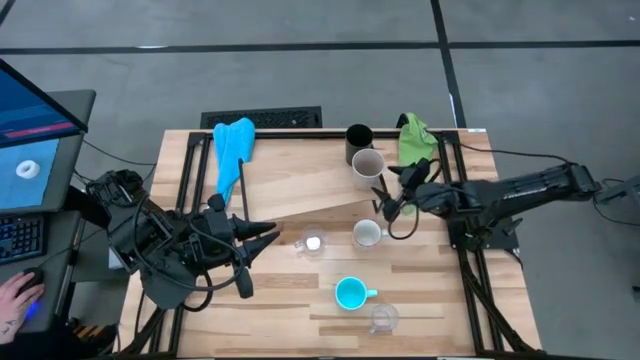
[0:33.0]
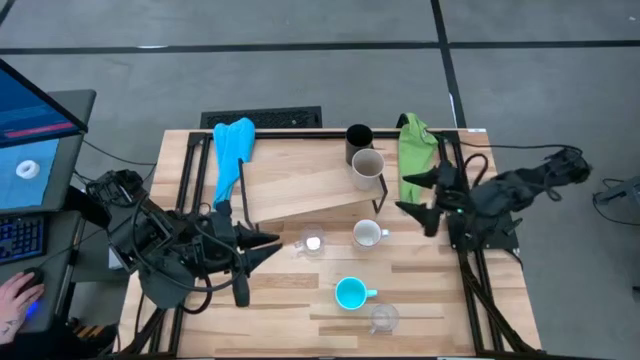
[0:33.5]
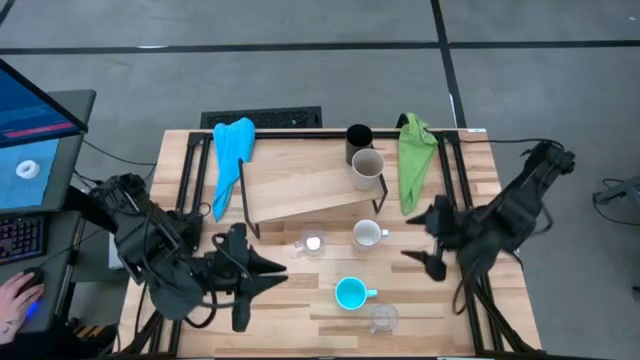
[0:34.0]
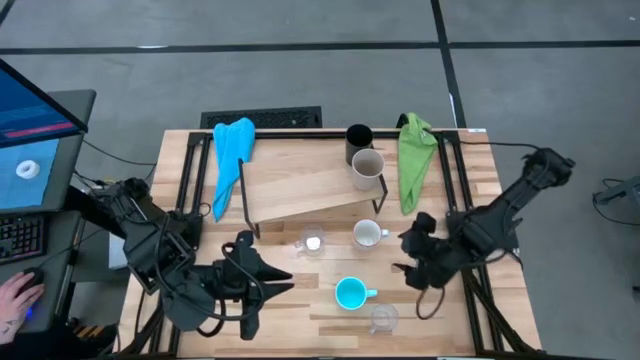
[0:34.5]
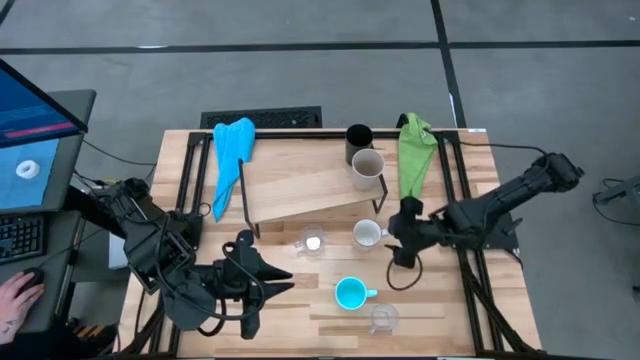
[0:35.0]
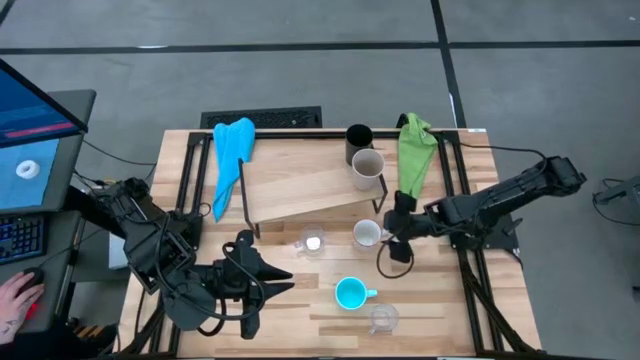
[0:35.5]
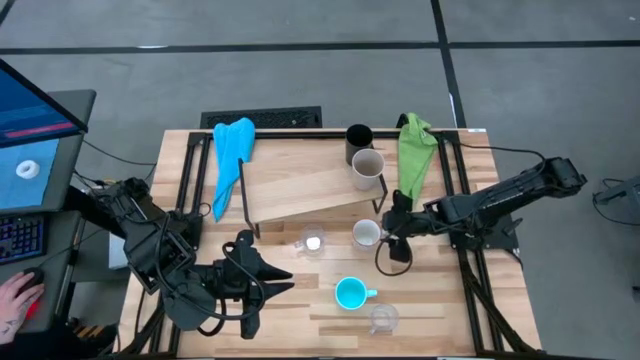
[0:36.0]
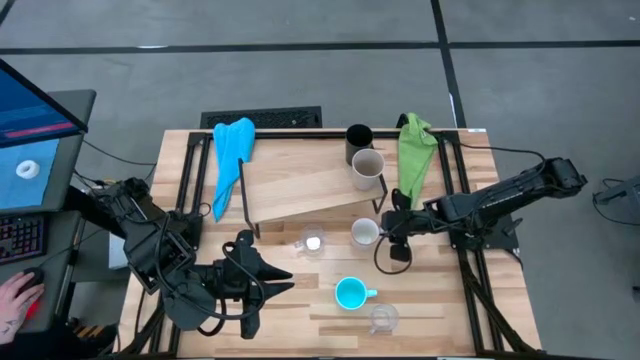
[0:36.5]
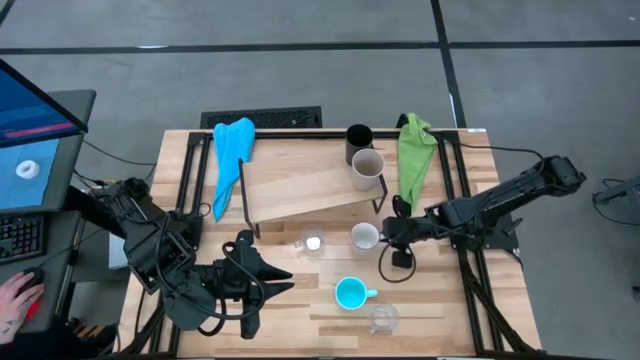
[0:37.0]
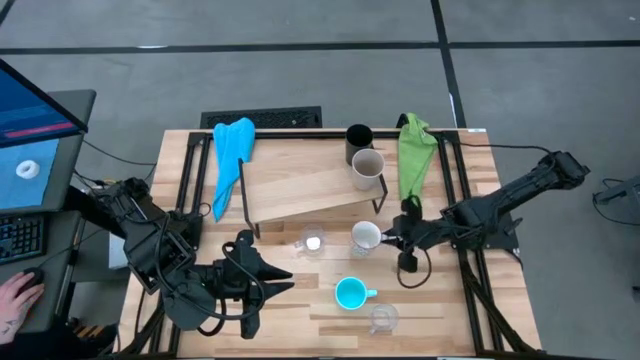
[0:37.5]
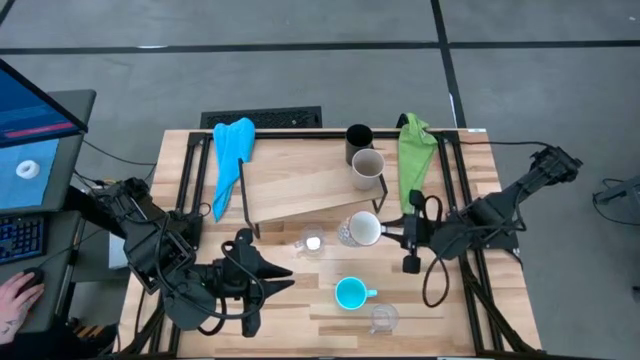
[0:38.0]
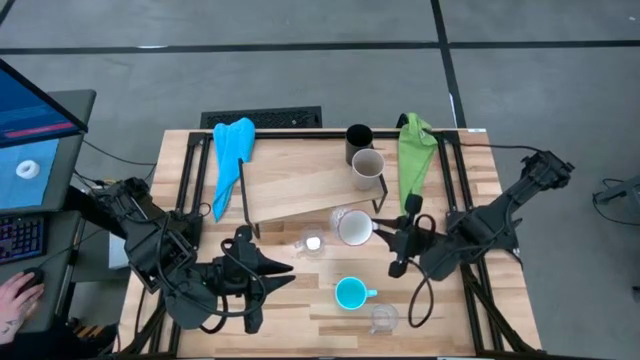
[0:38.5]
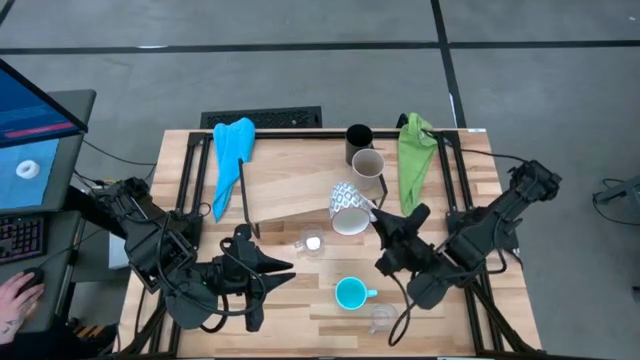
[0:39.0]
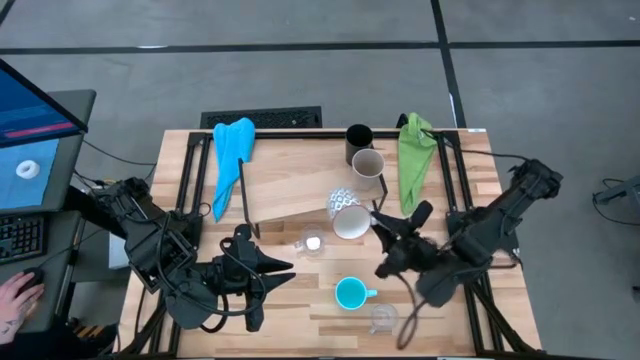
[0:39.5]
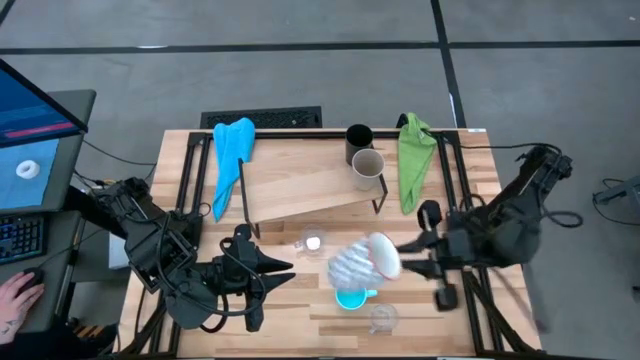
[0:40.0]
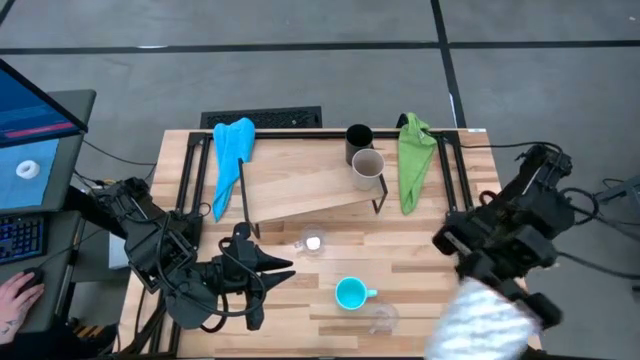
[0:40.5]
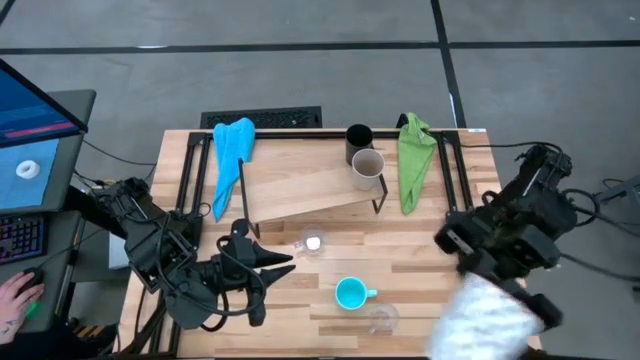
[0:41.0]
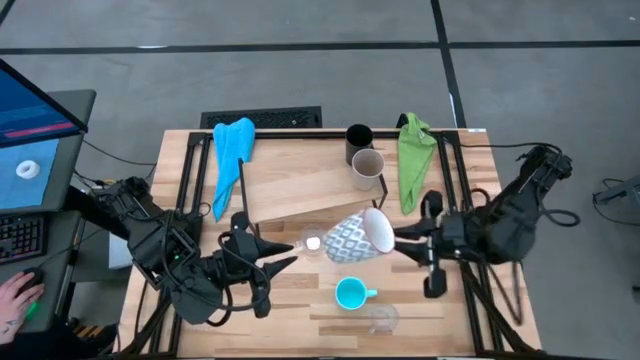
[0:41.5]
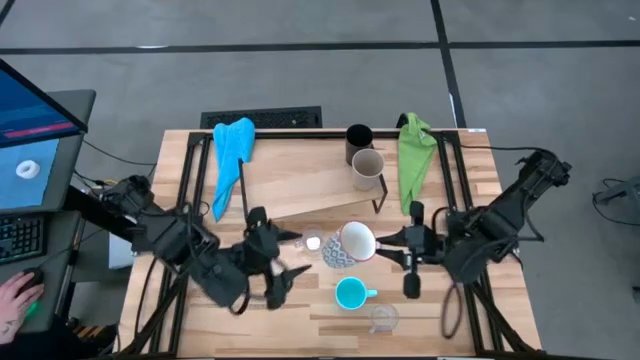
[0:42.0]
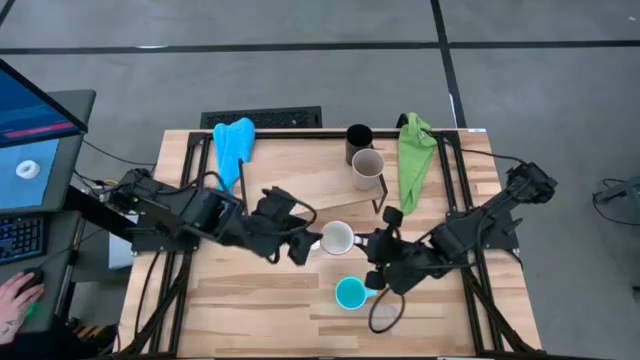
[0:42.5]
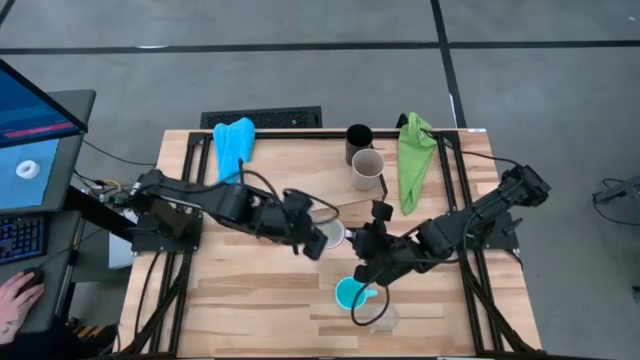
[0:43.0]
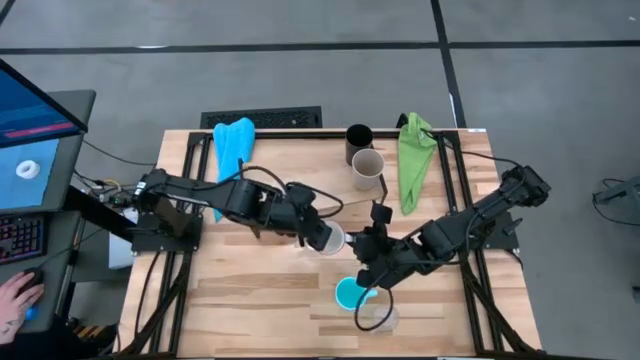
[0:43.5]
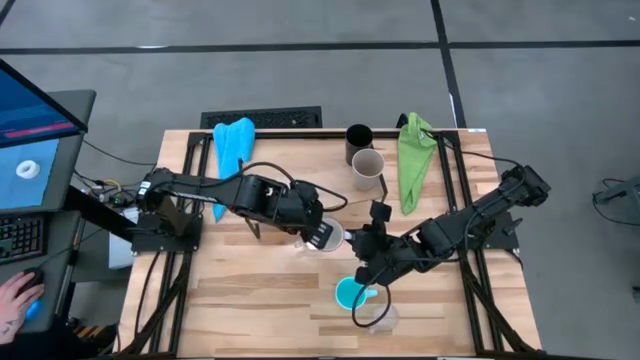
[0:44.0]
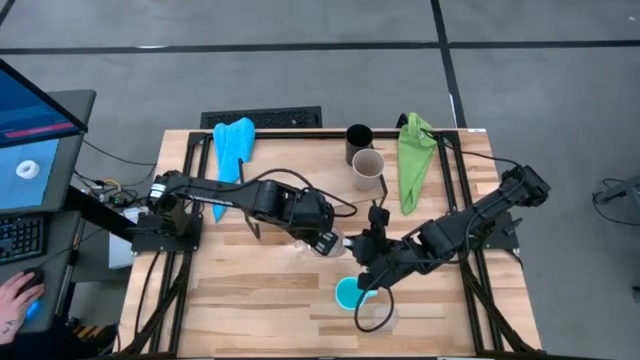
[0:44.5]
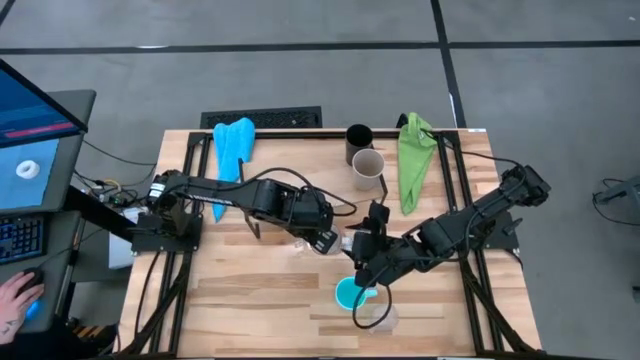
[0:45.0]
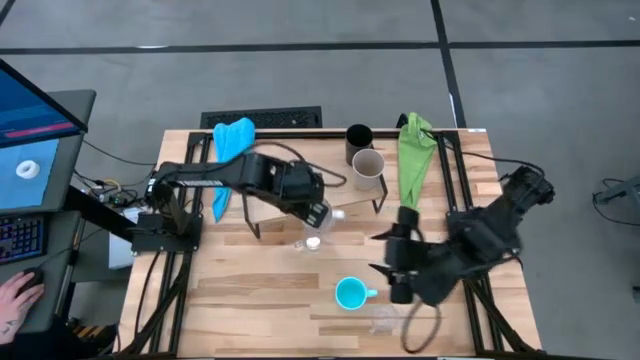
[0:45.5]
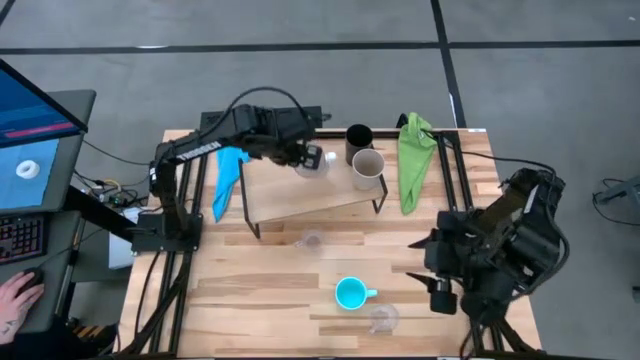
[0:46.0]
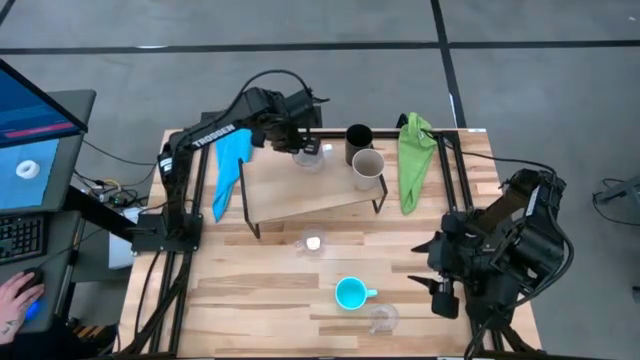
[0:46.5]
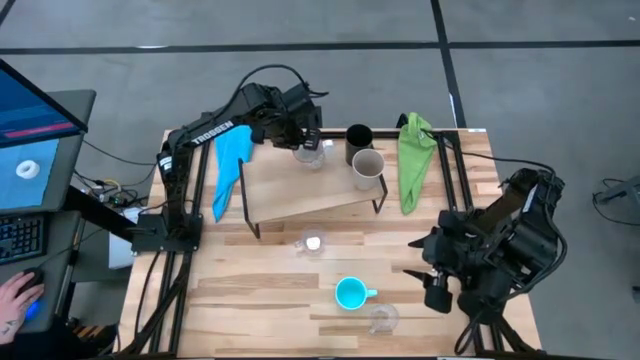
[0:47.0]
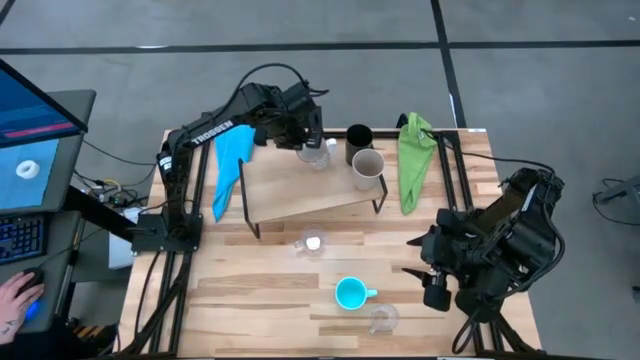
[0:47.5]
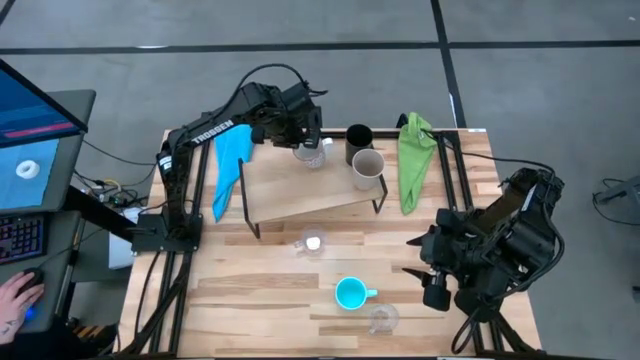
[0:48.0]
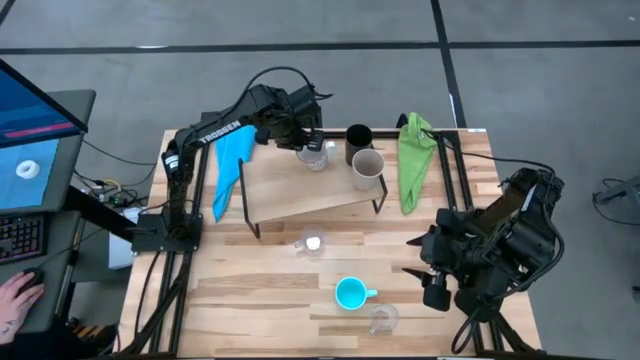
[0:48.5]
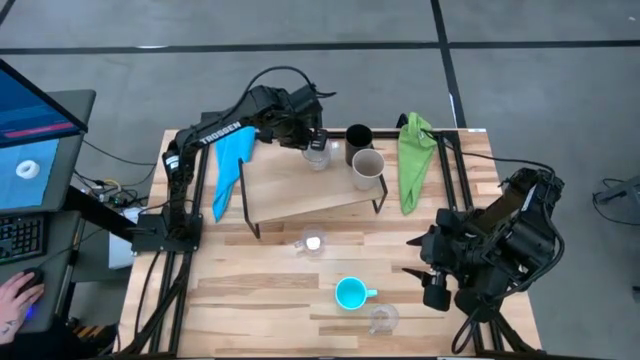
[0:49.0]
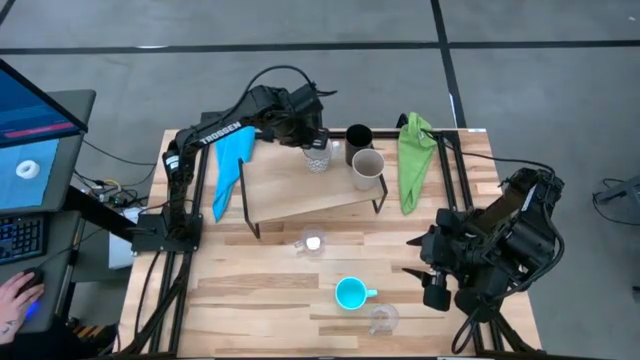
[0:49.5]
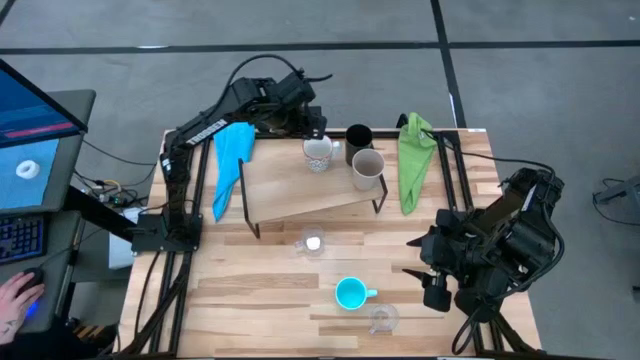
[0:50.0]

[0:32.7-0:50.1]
Task: Stack small to large cups/mugs on shelf
Put the gray patterned mug on the shelf

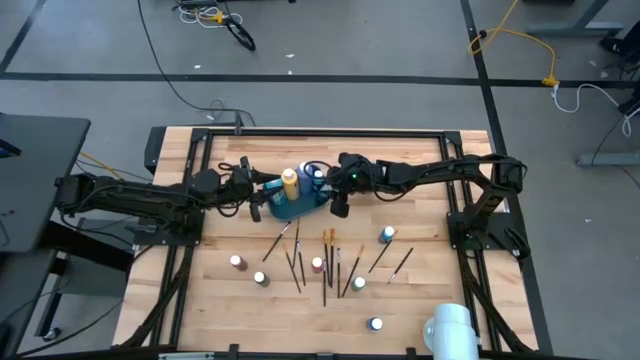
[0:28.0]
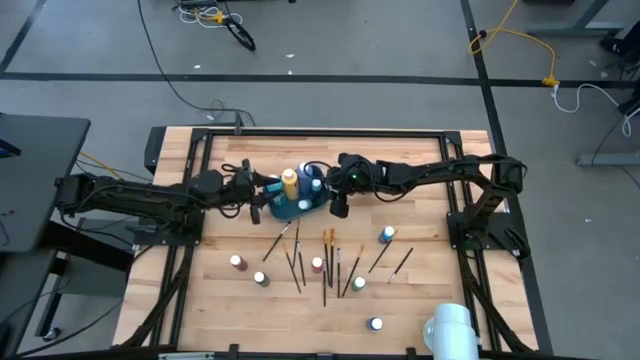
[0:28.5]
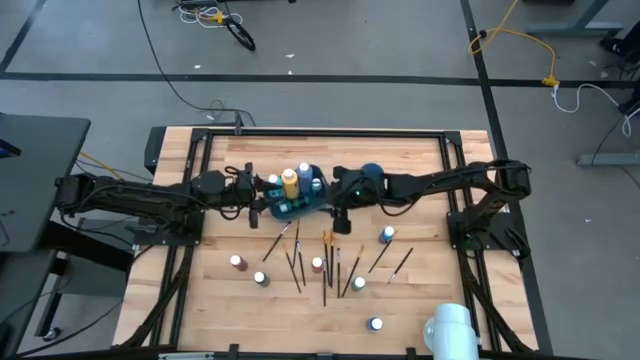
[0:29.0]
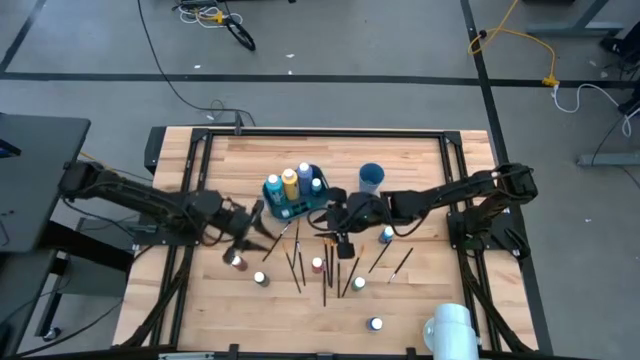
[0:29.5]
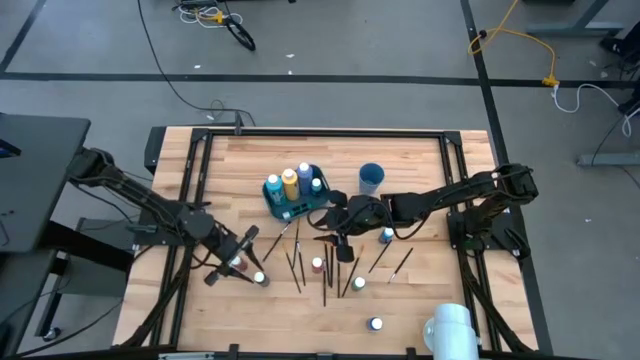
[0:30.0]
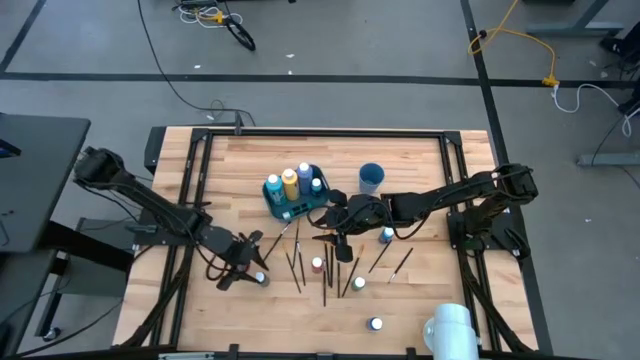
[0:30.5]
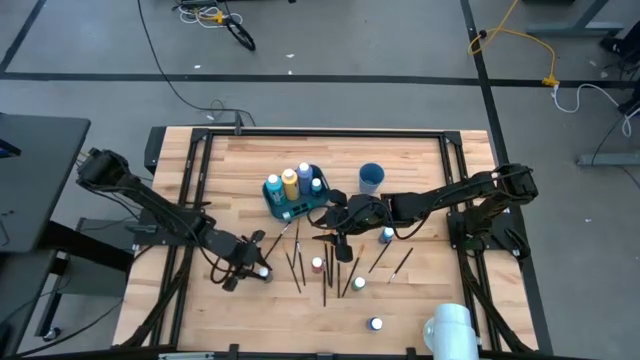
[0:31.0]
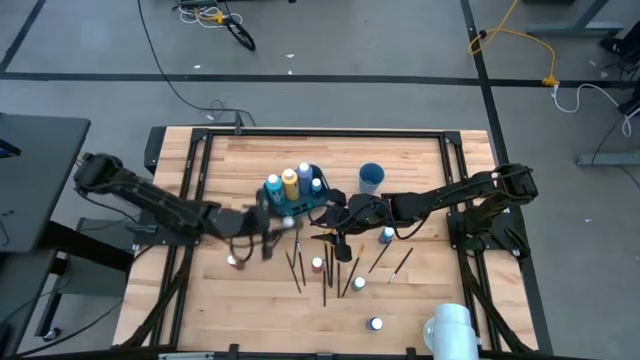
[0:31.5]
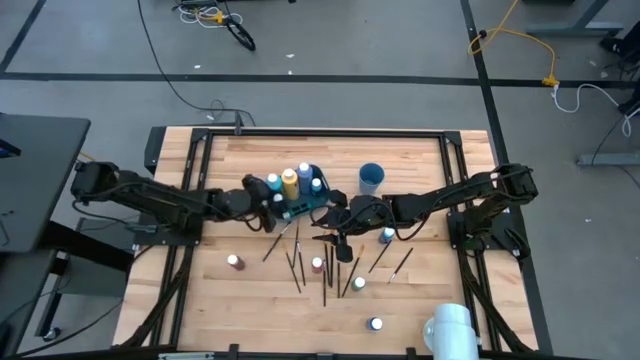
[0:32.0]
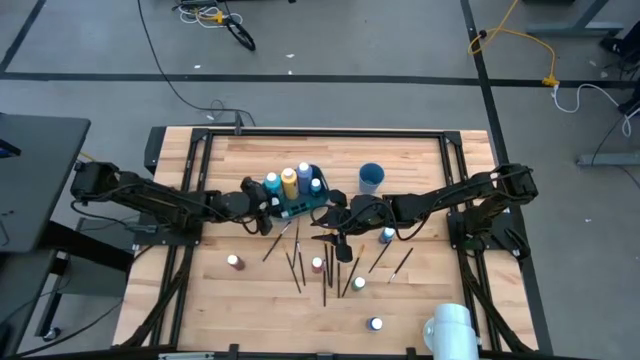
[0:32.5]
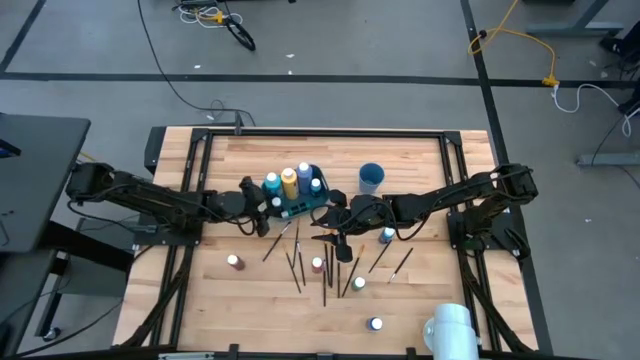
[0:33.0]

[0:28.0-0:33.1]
Task: Pick & Place Paint Supplies
Put the black paint bottle into the blue bin
